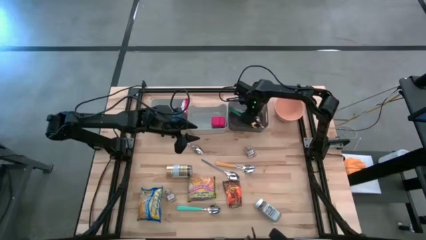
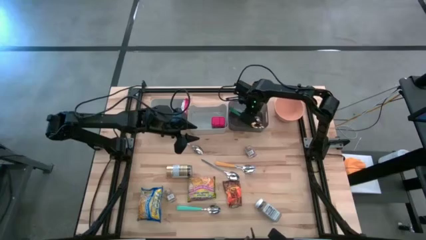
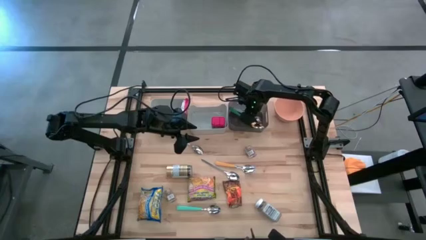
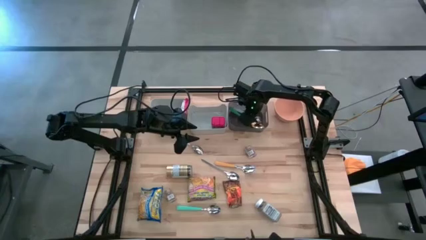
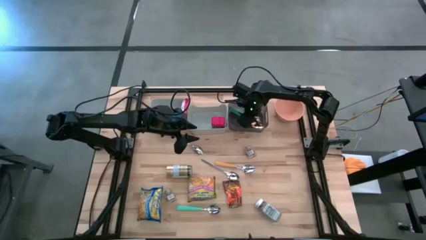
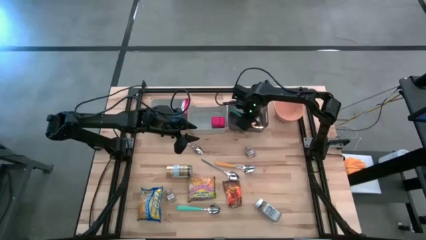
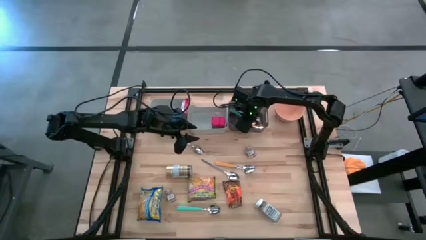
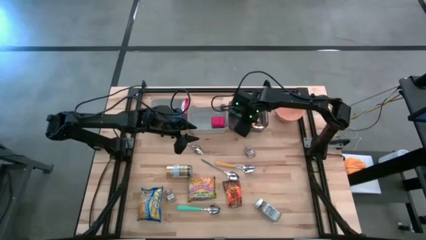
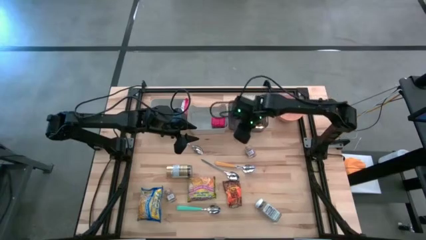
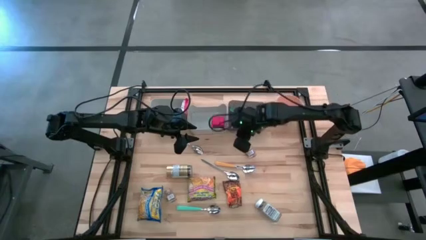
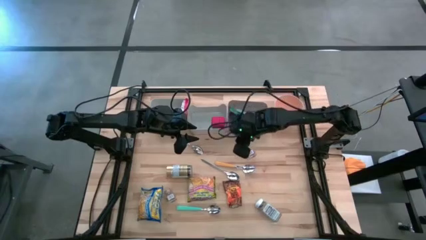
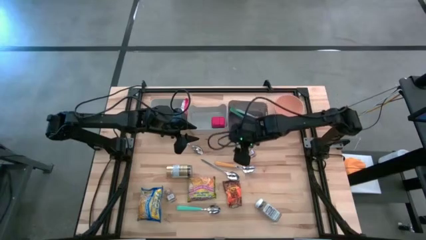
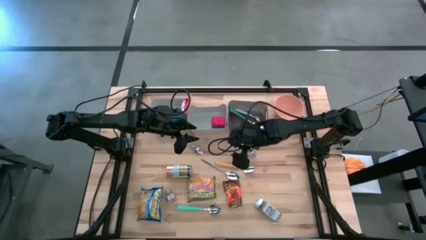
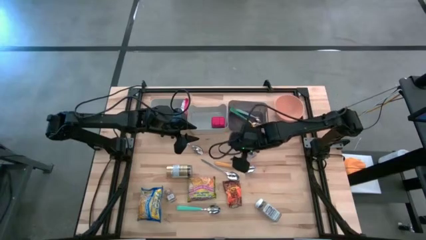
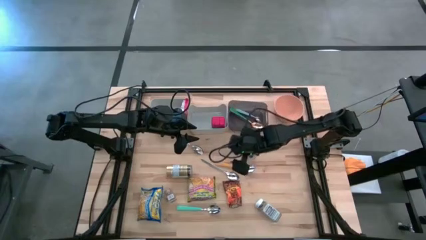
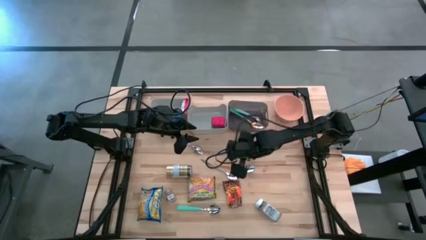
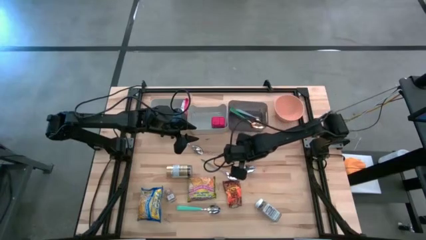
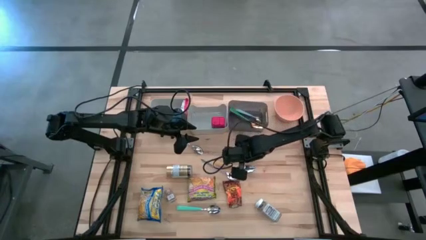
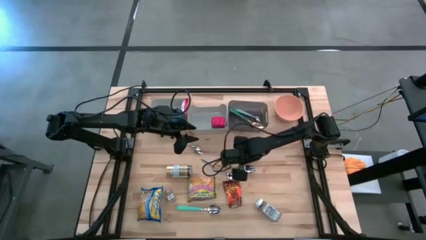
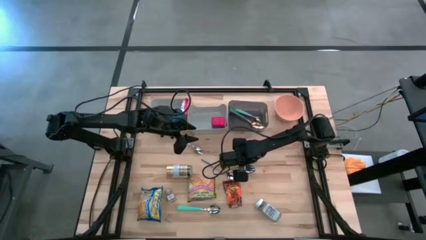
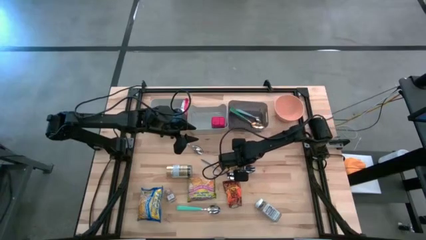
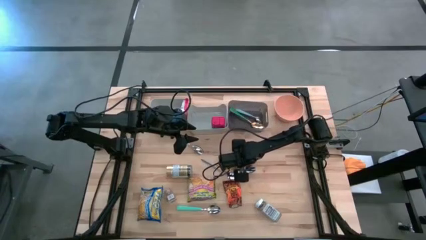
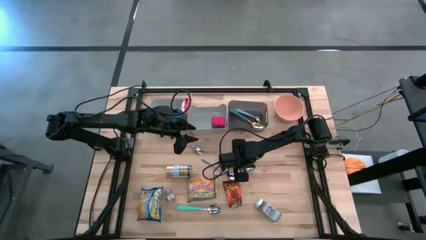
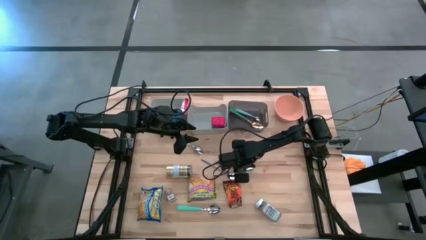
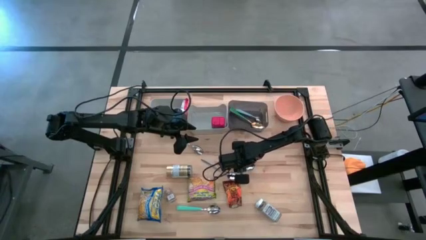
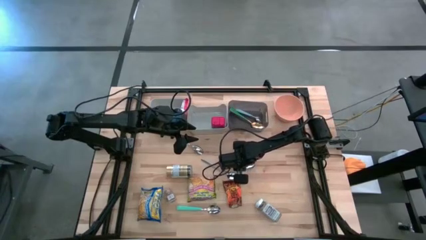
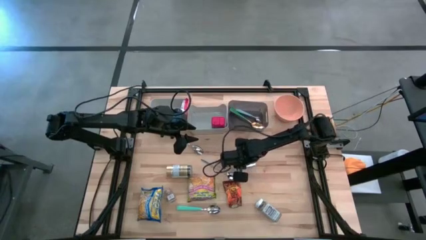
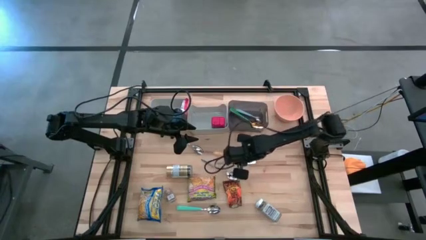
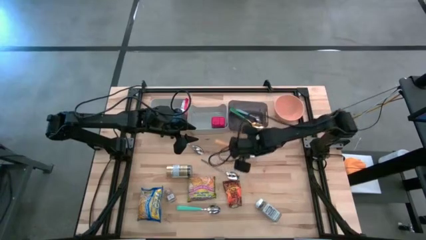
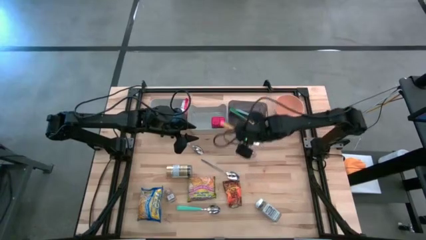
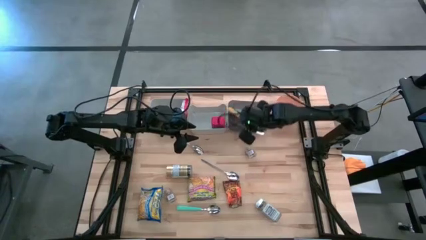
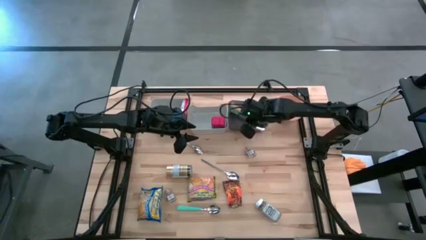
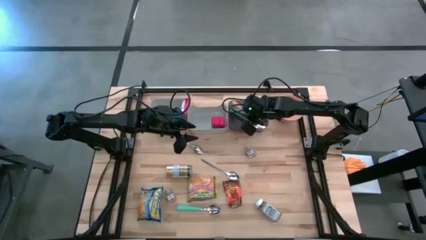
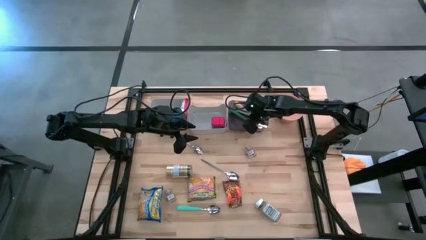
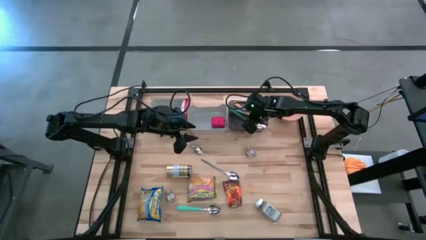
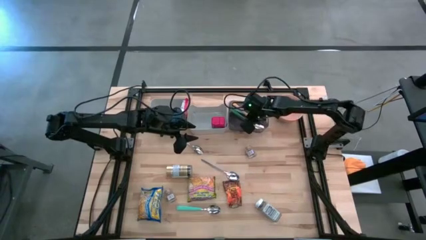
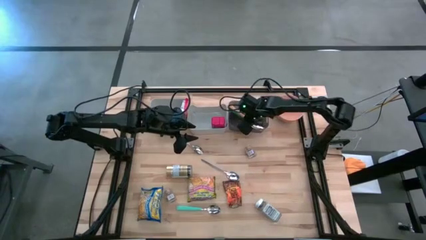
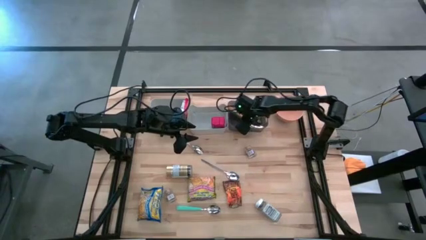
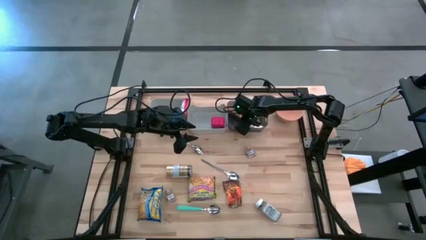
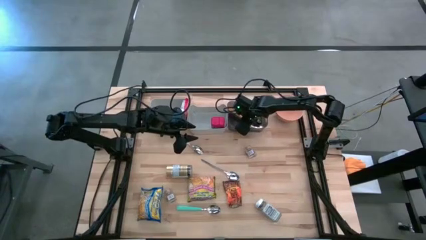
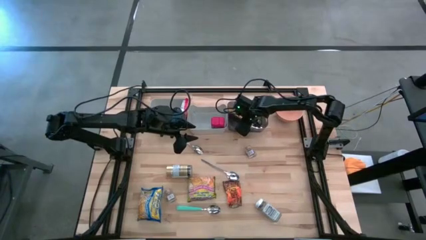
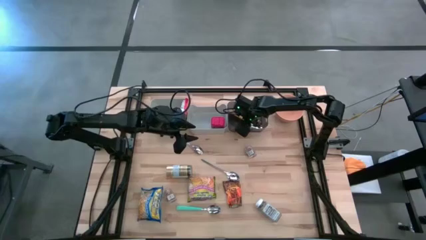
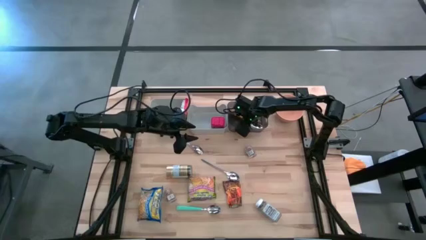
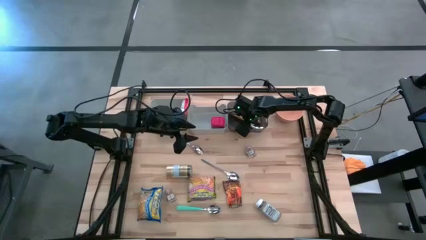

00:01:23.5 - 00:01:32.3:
Put the yellow spoon into the black bin

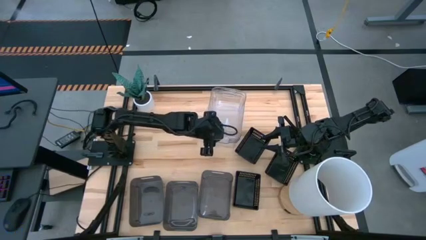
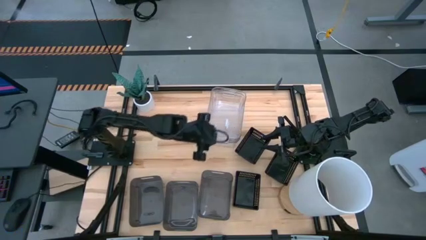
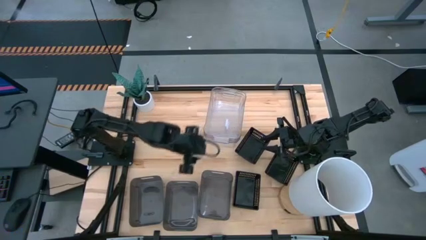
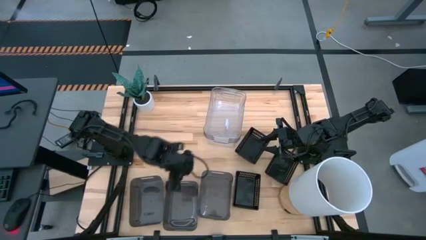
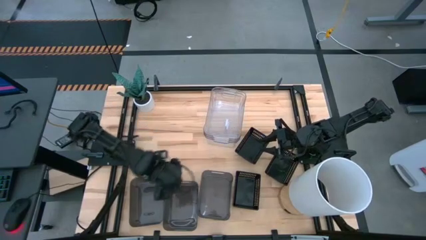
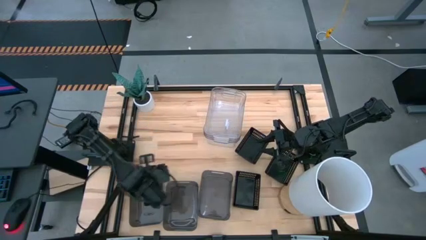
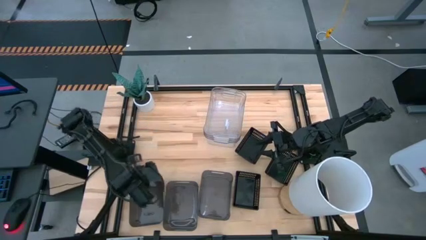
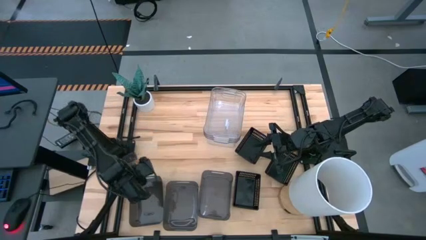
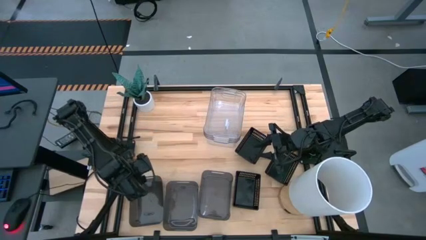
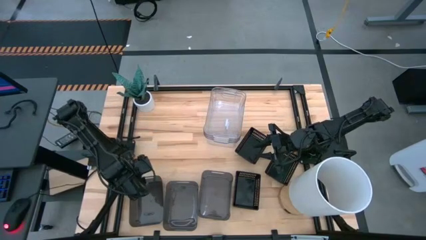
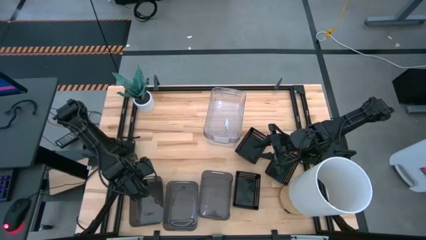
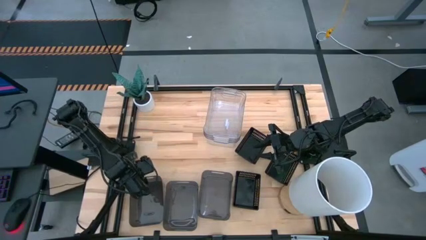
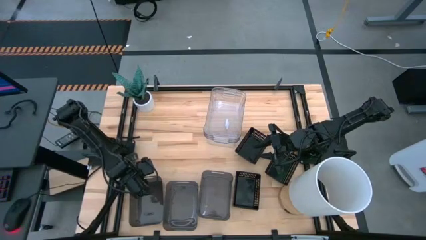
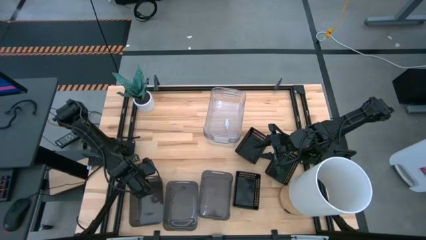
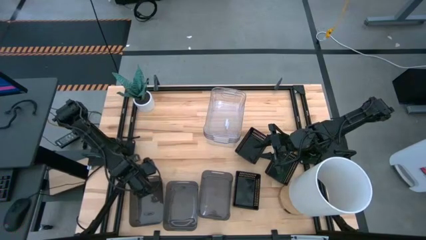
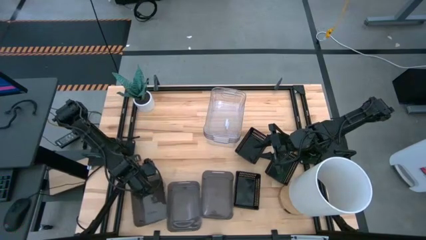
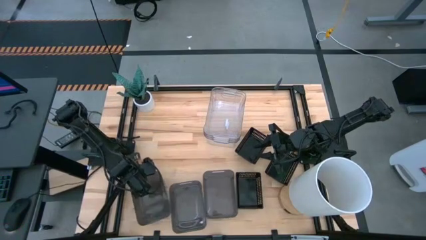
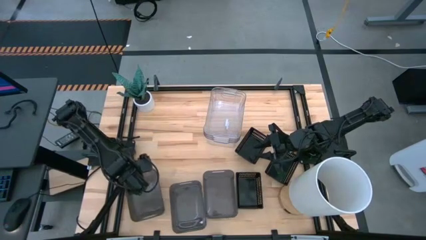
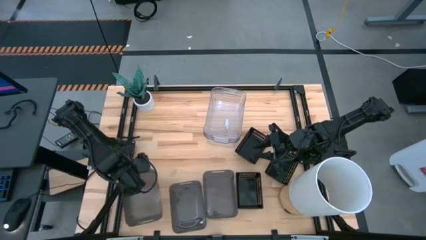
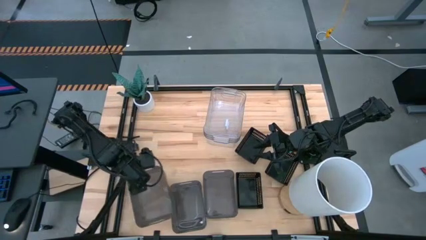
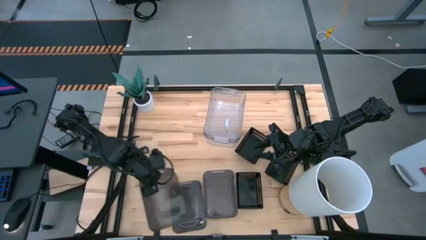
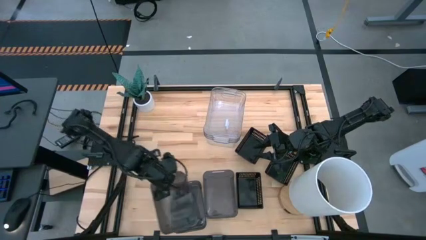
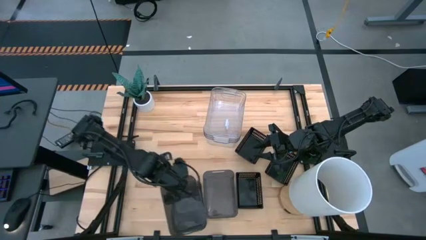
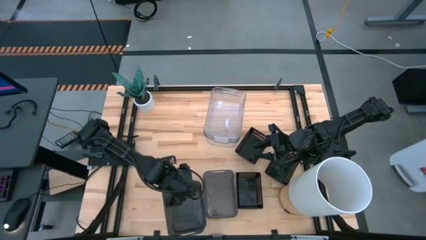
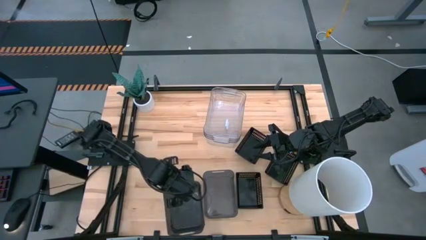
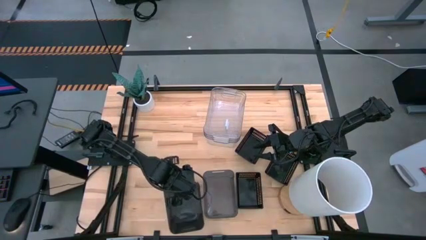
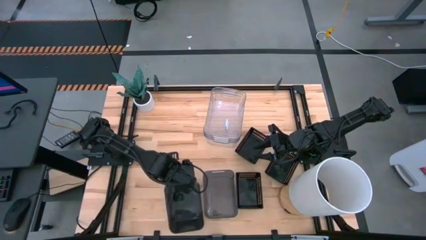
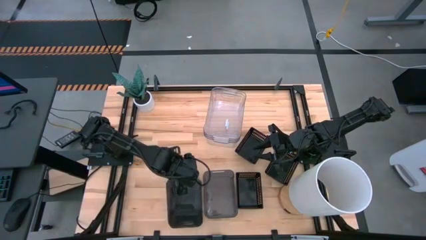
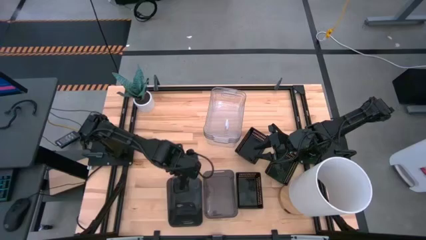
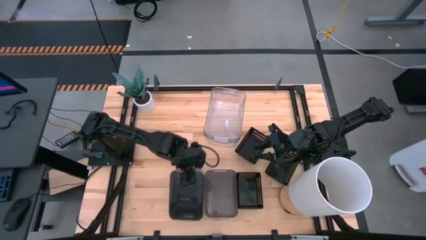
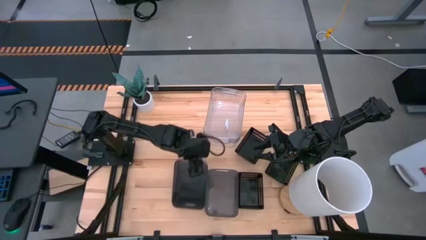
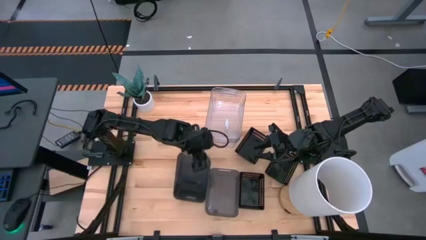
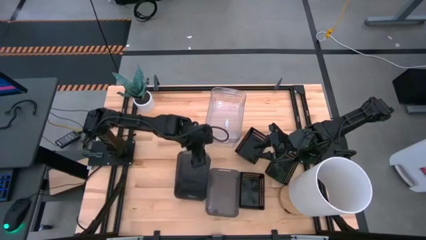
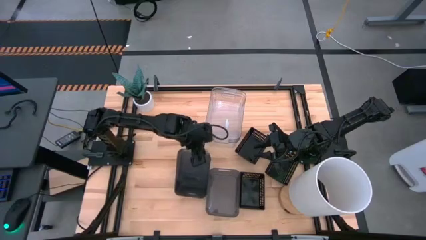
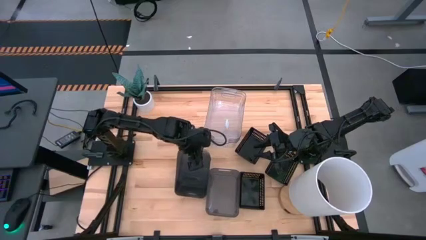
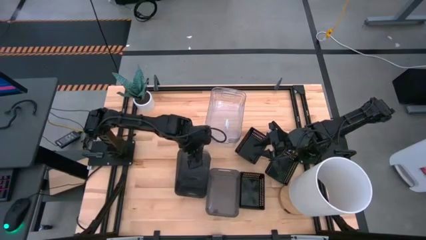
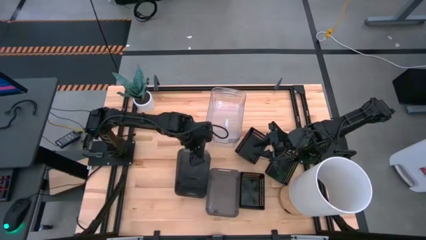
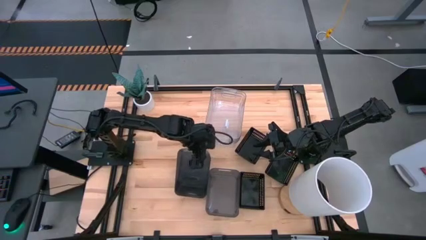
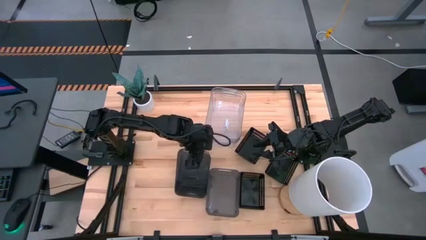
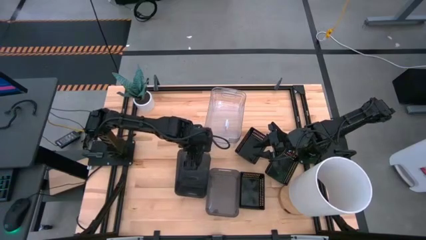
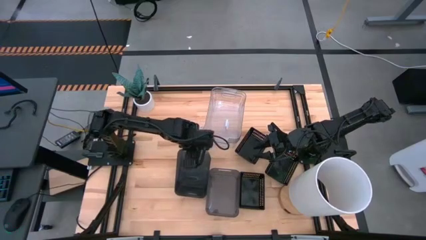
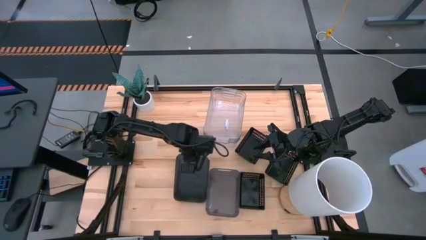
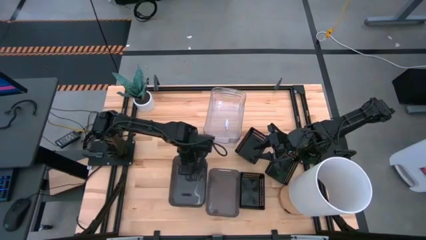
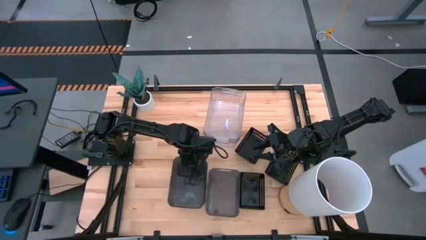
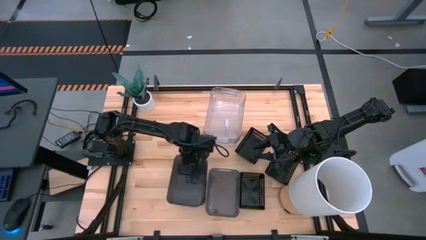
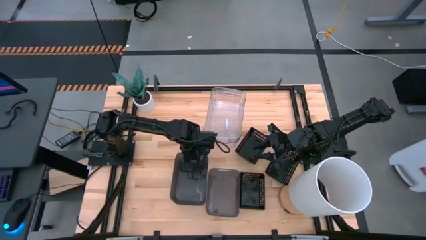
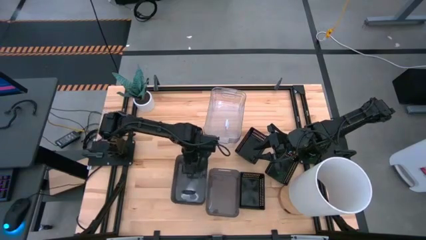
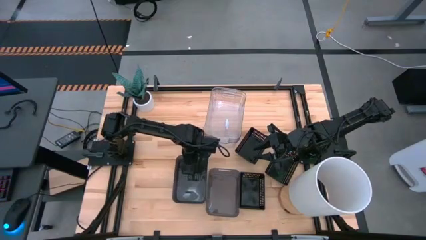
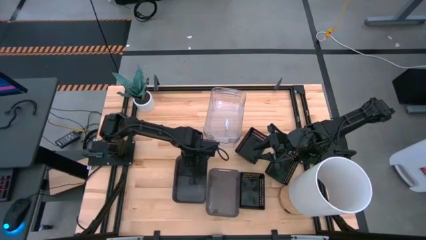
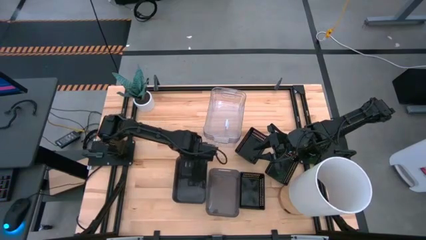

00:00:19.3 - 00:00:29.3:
Stack the left transparent black bin on top of the middle transparent black bin
